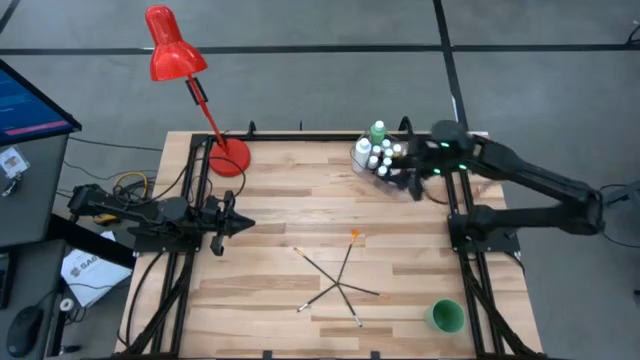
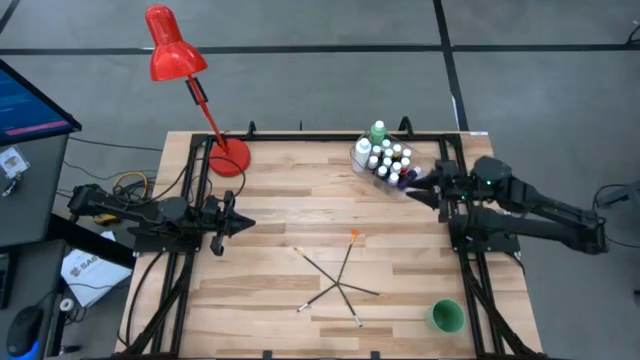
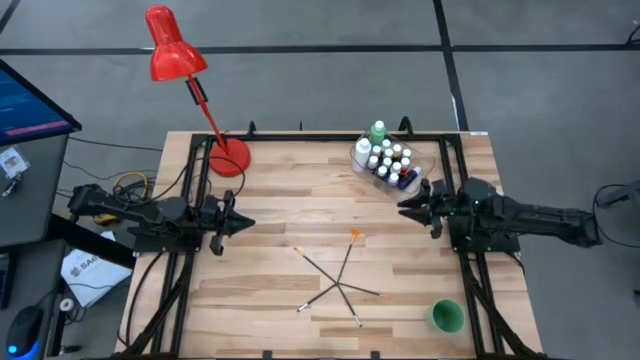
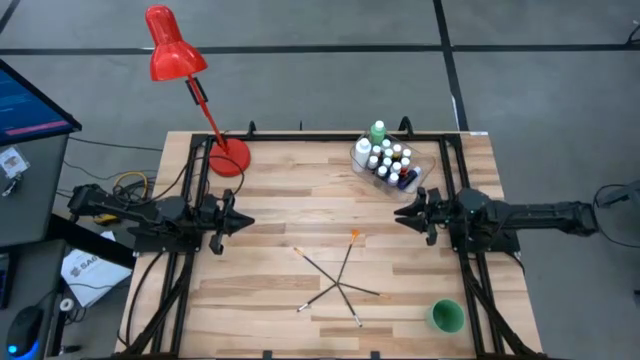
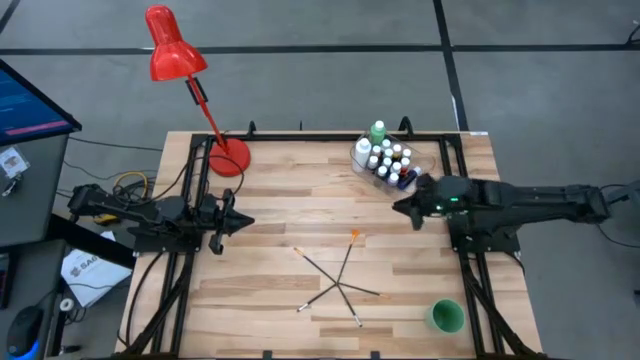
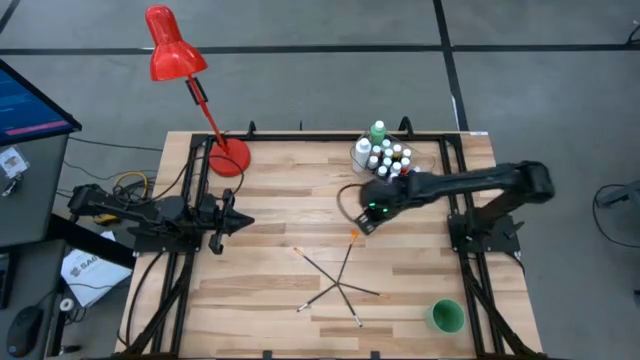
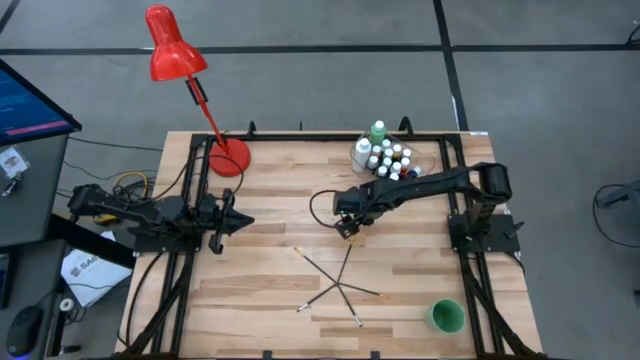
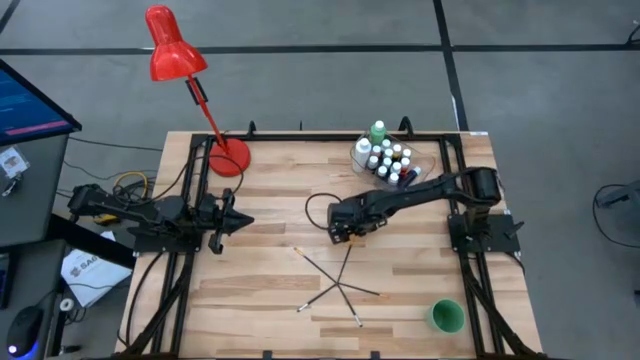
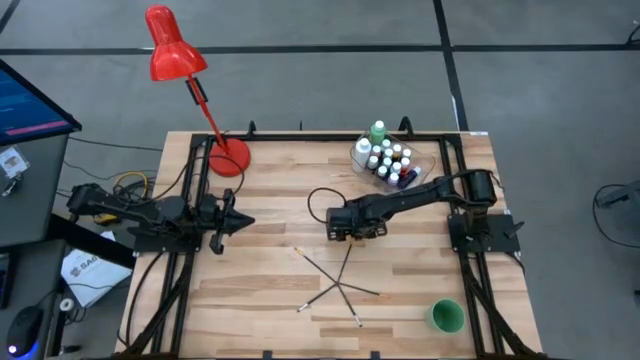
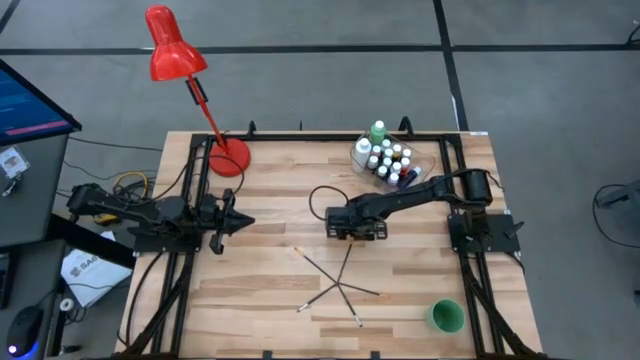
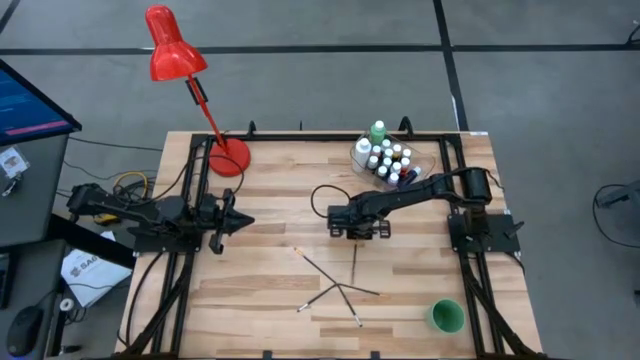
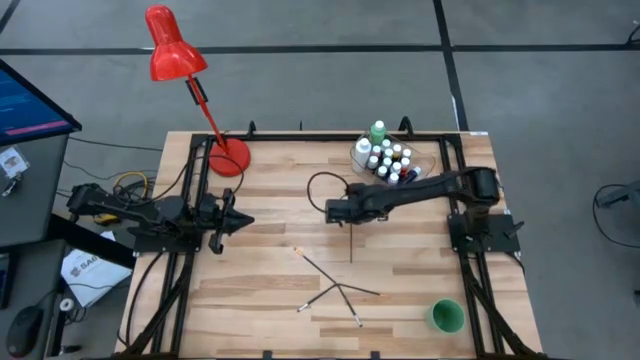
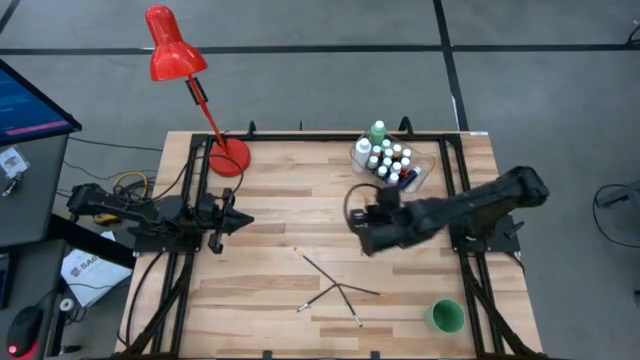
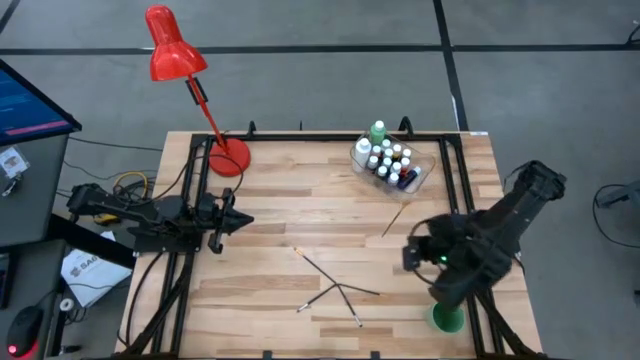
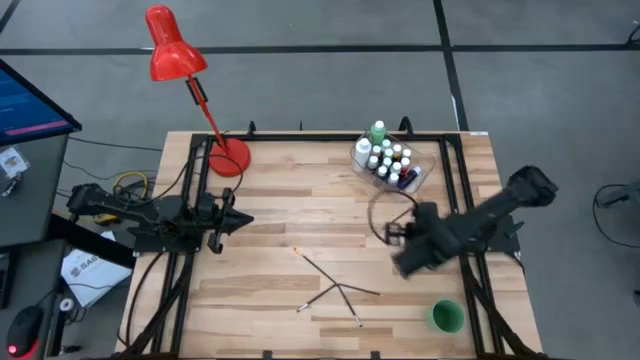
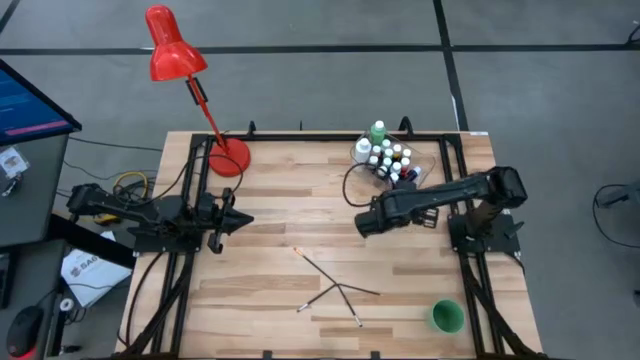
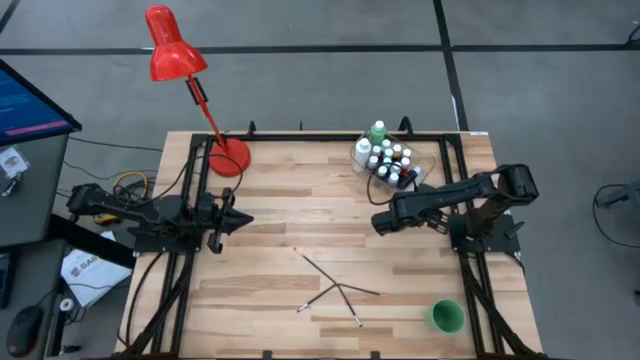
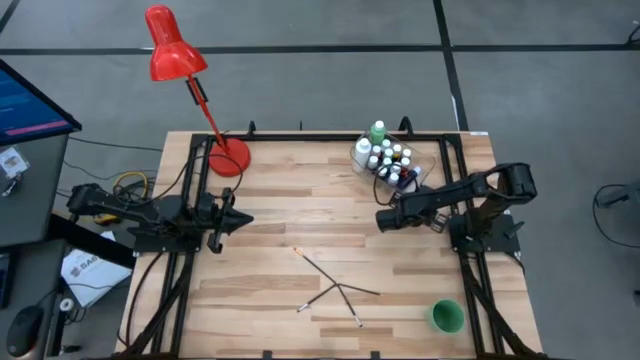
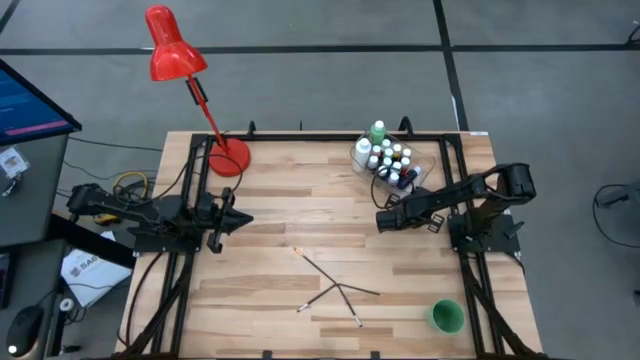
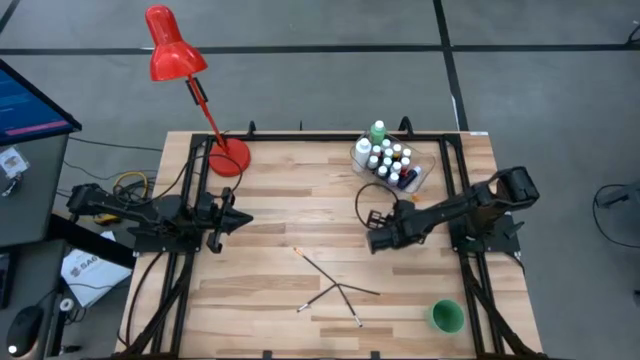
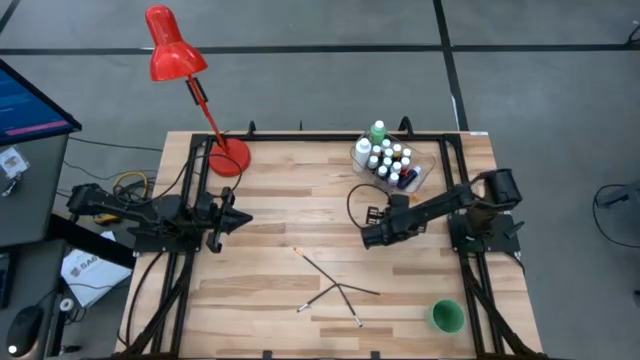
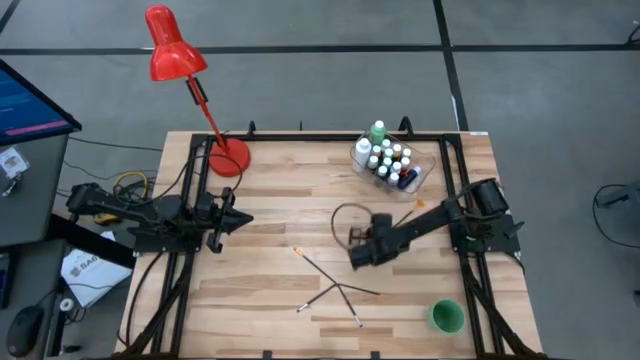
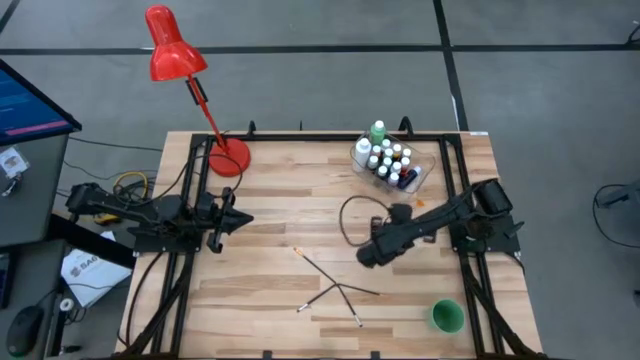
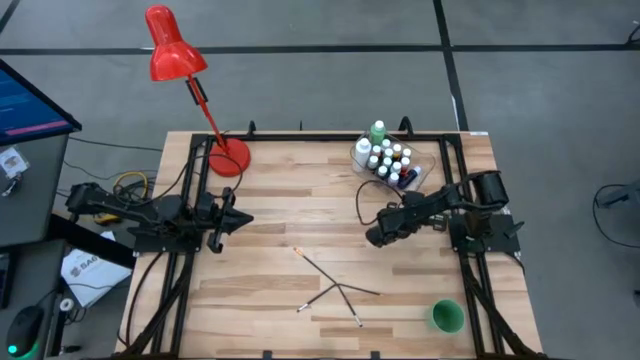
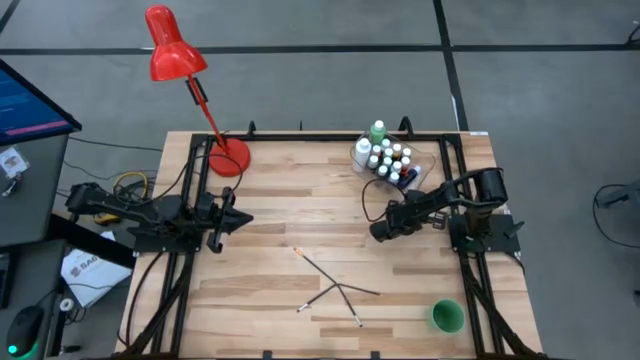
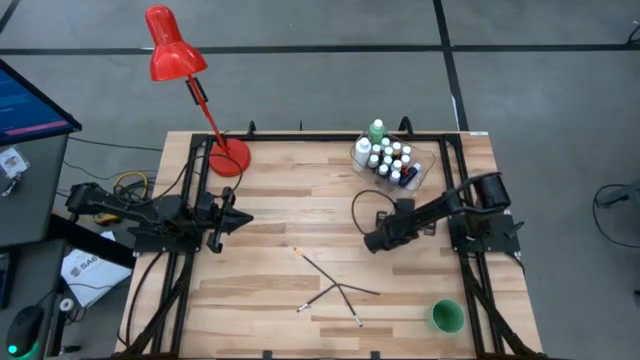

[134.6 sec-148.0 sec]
Task: Pick & Place Paint Supplies
Put the yellow paint brush into the green cup

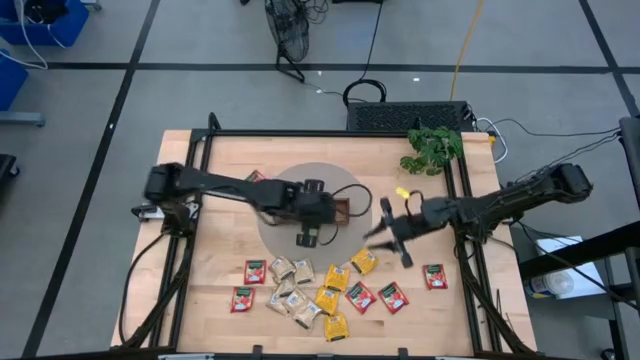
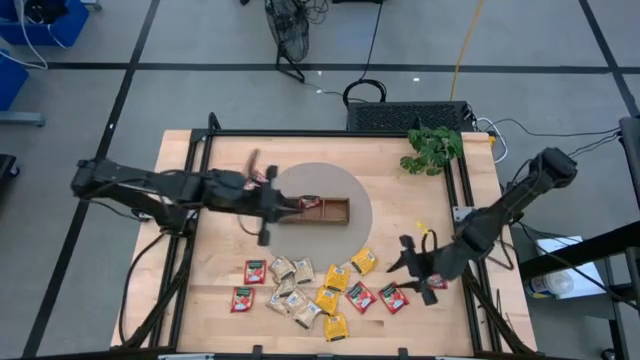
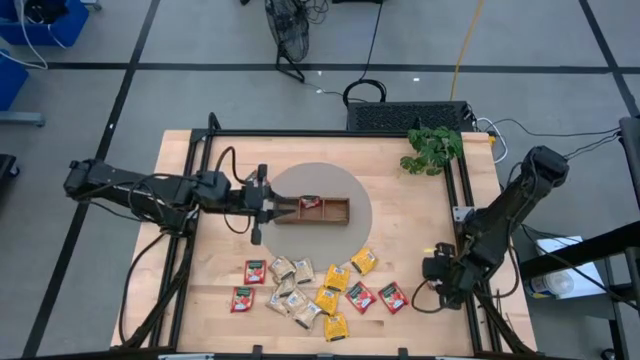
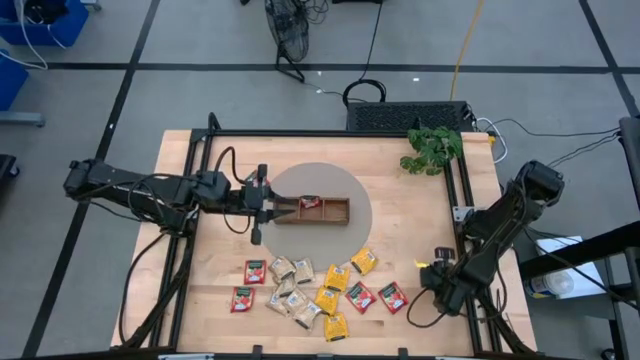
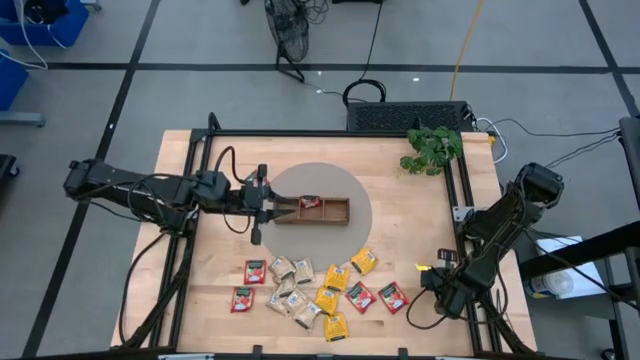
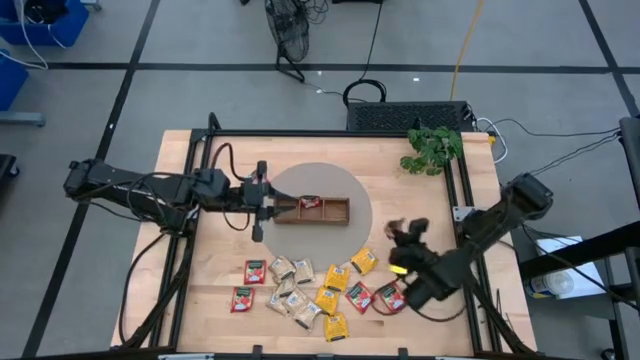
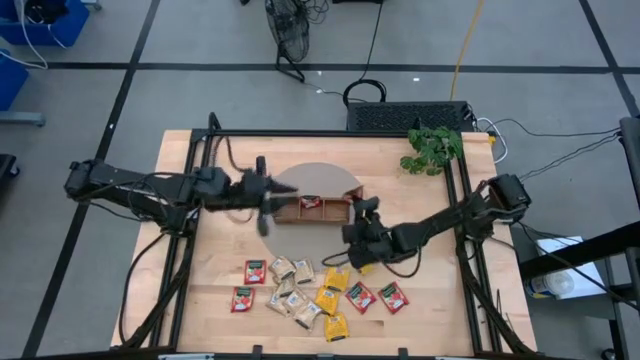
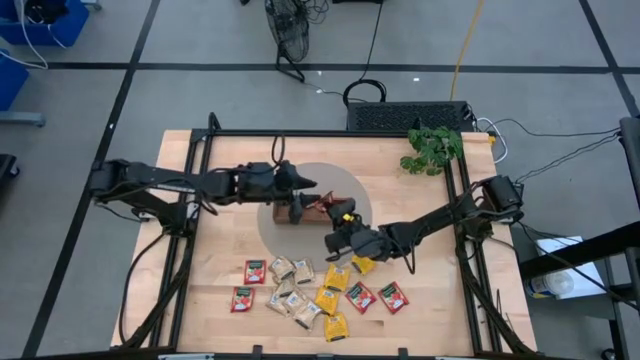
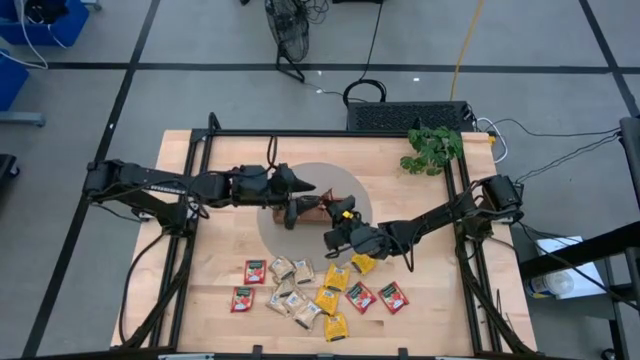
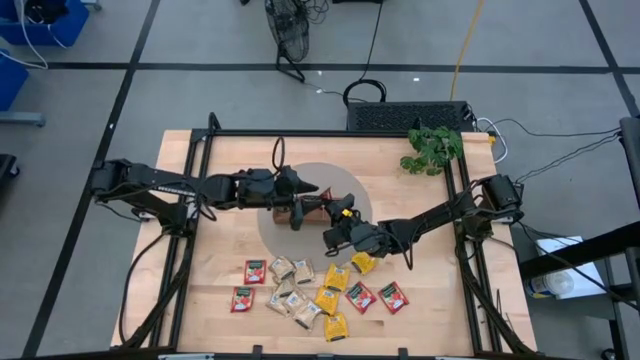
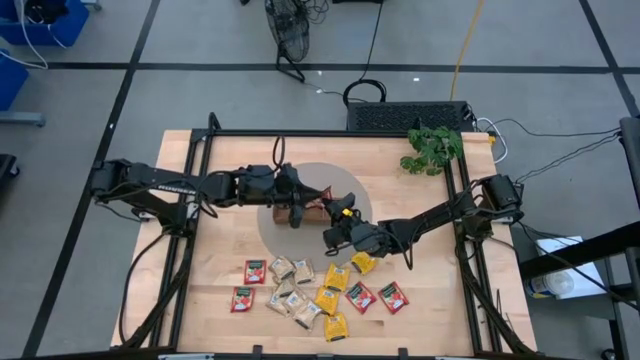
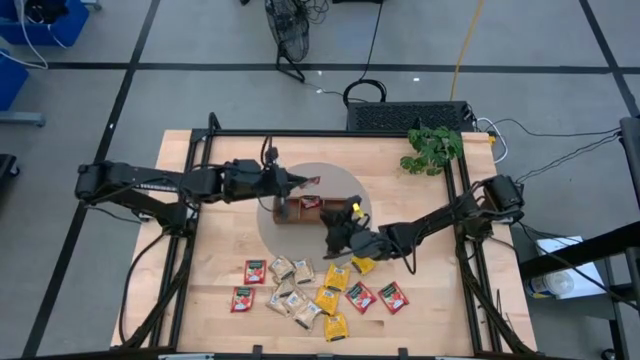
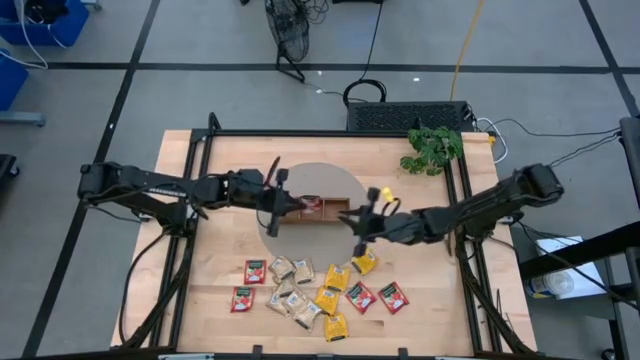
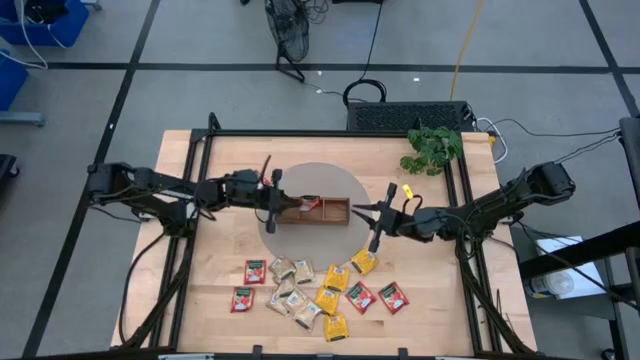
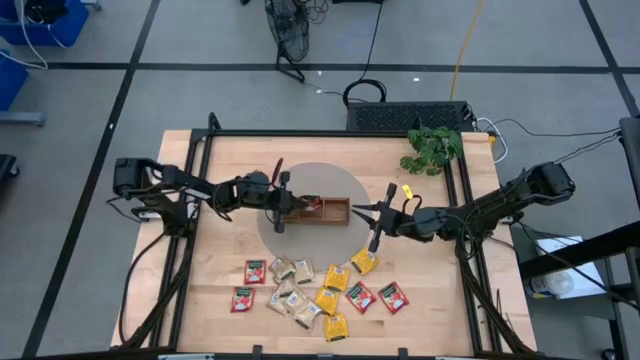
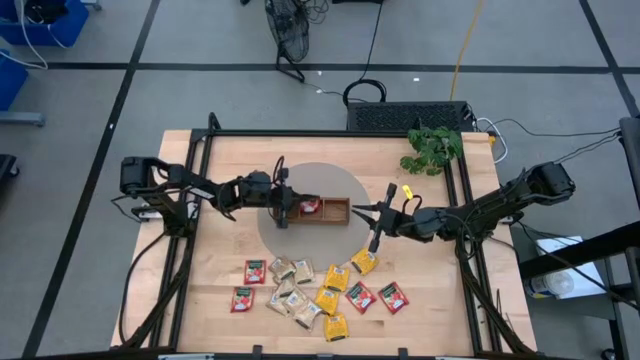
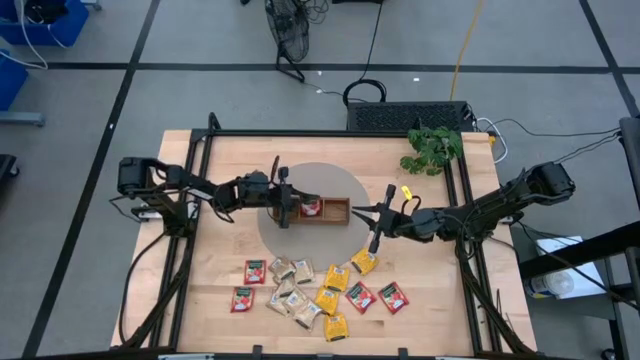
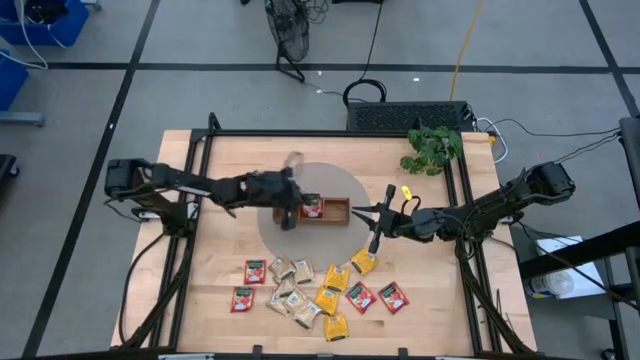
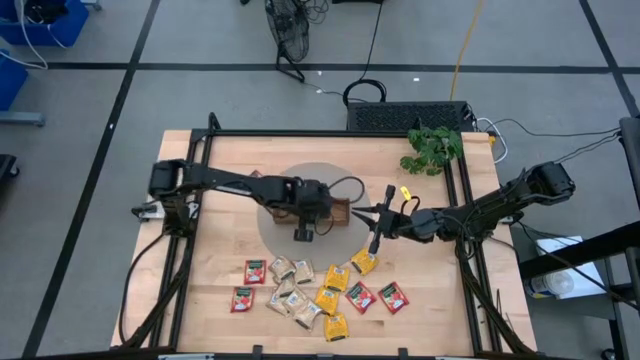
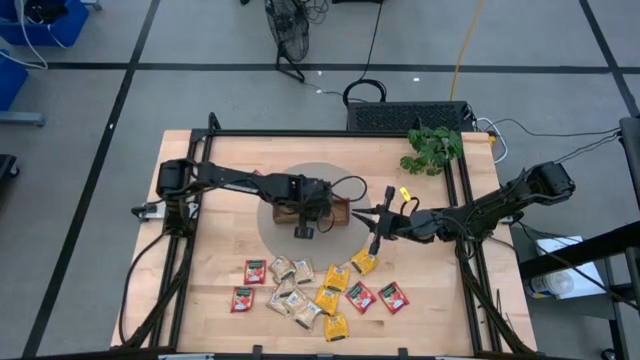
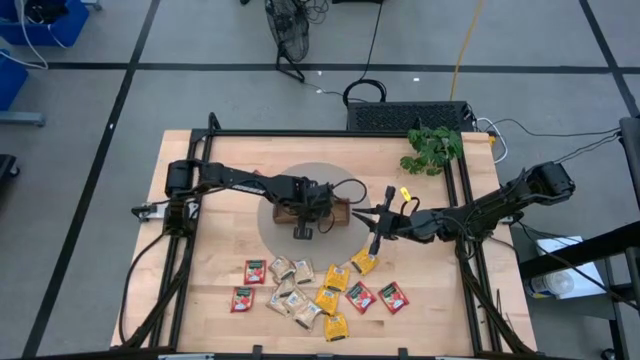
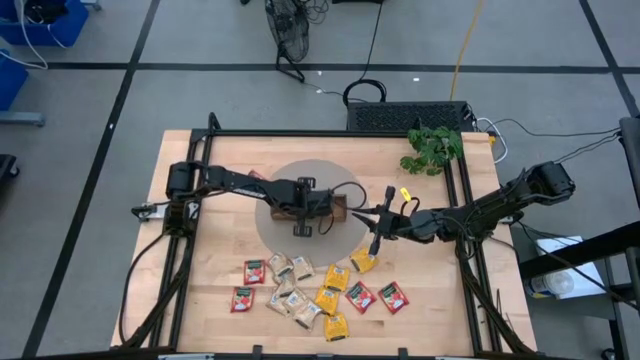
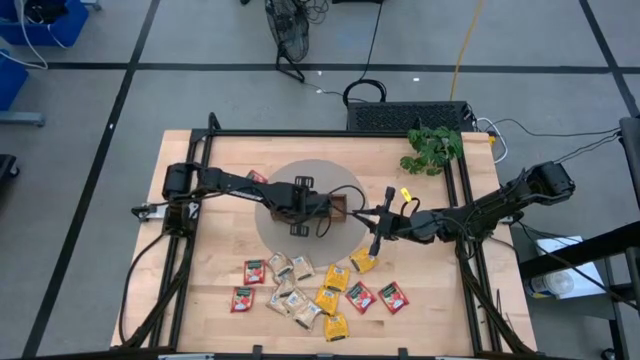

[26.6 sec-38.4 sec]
Task: Pick & Place Tea
Put the red tea bag into the wooden organizer
